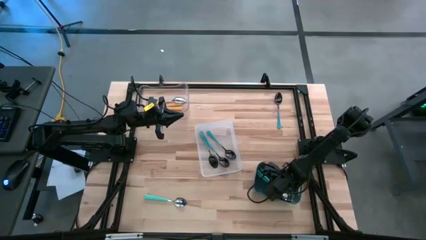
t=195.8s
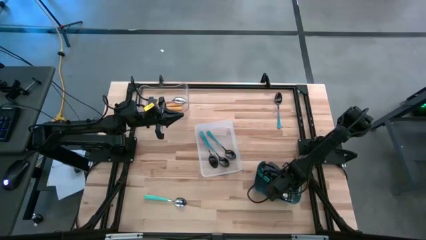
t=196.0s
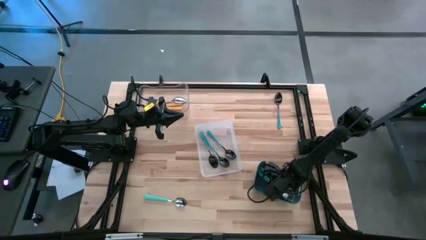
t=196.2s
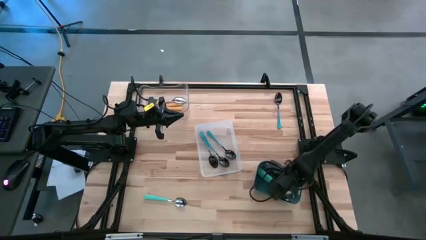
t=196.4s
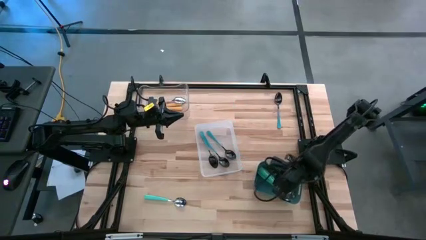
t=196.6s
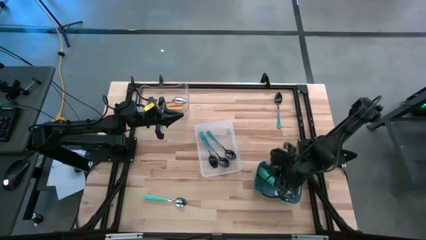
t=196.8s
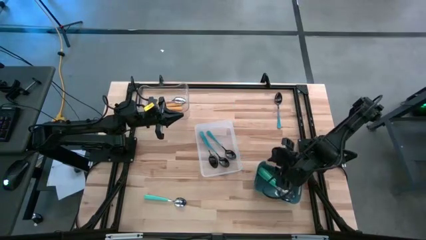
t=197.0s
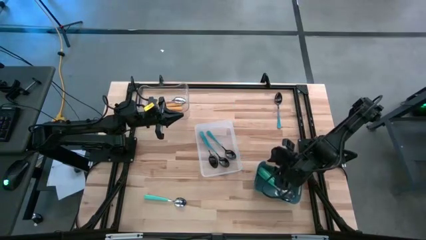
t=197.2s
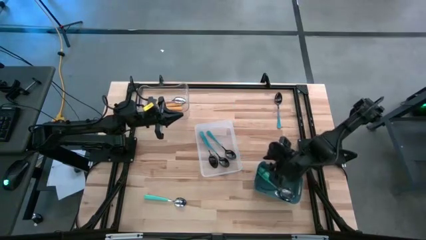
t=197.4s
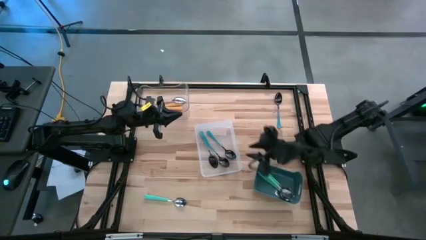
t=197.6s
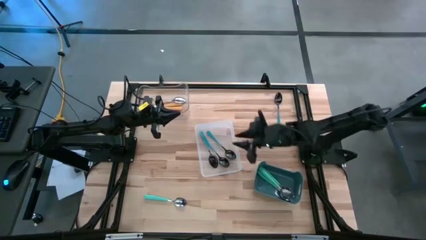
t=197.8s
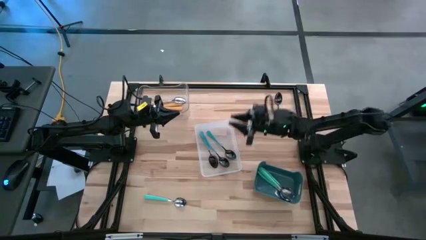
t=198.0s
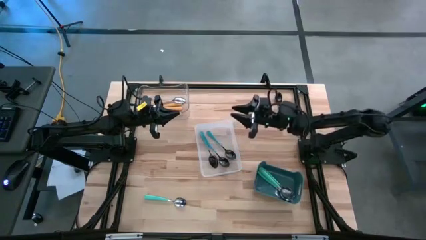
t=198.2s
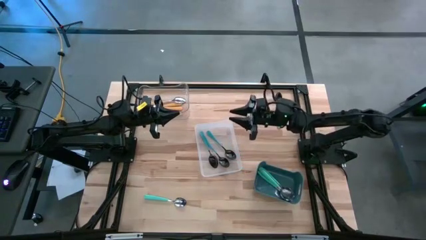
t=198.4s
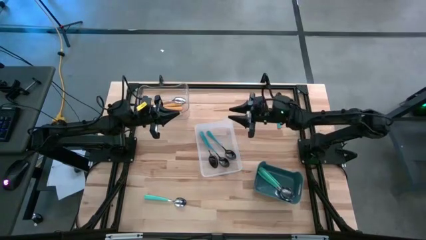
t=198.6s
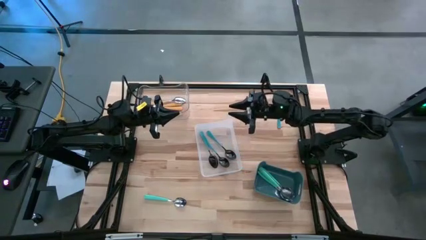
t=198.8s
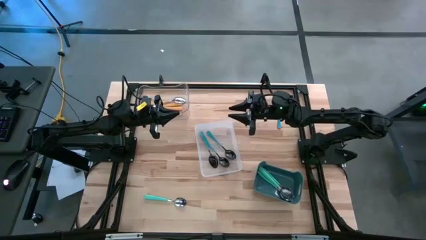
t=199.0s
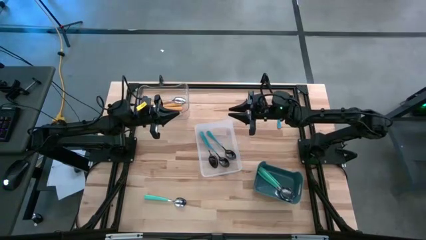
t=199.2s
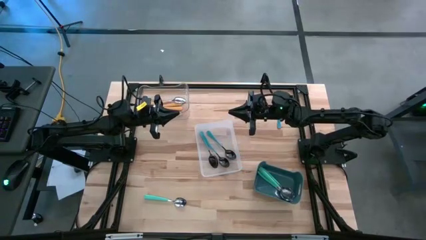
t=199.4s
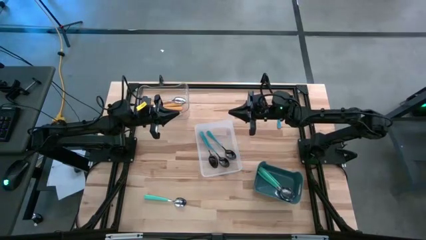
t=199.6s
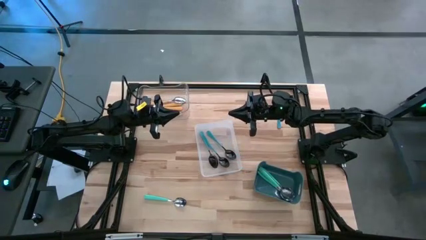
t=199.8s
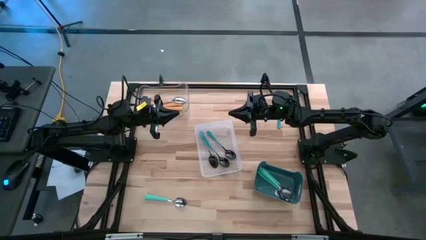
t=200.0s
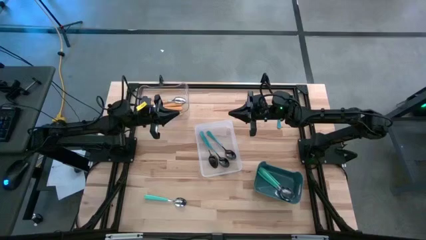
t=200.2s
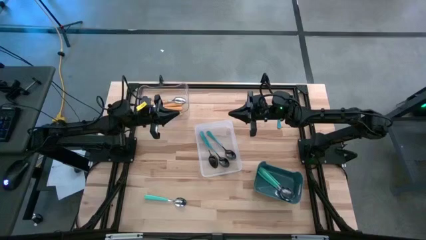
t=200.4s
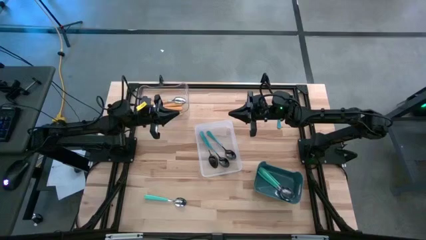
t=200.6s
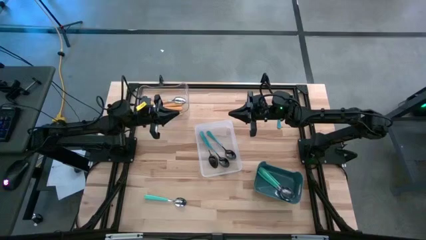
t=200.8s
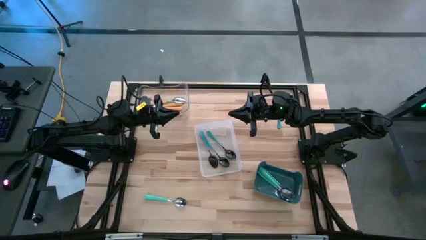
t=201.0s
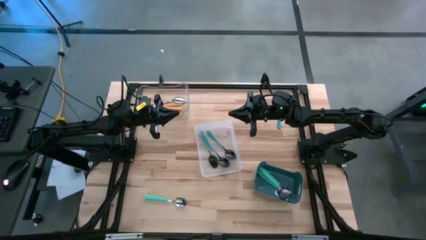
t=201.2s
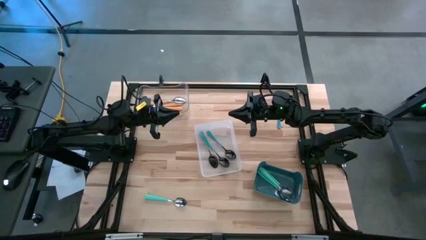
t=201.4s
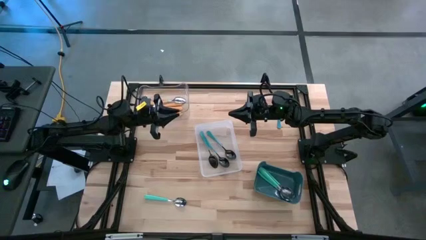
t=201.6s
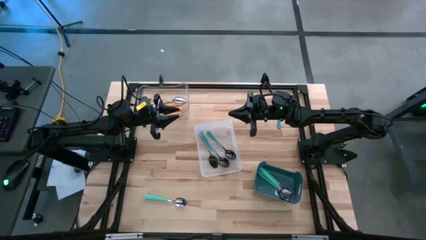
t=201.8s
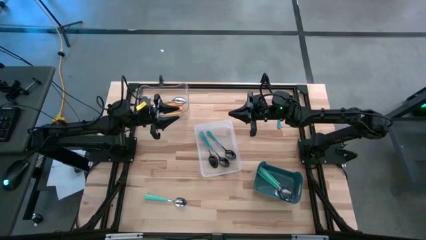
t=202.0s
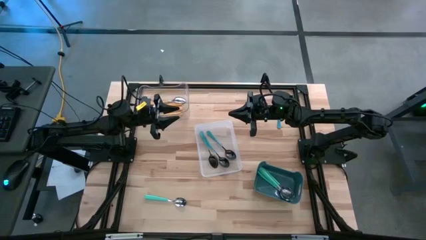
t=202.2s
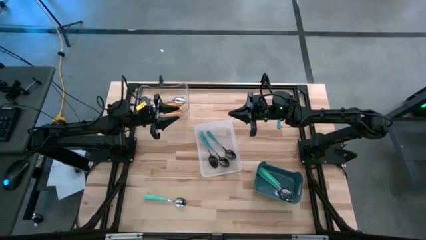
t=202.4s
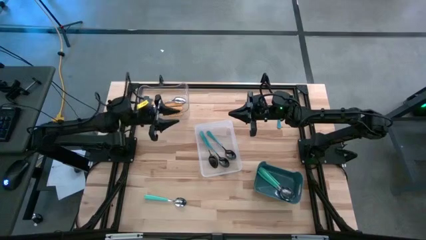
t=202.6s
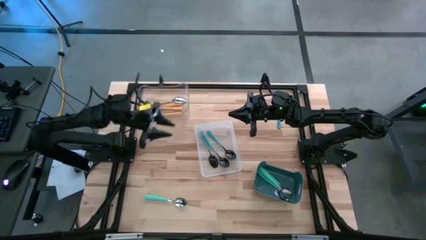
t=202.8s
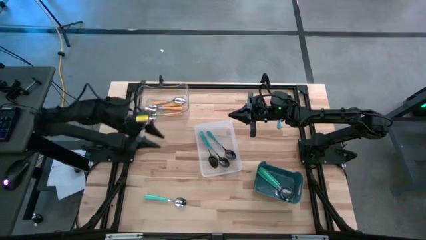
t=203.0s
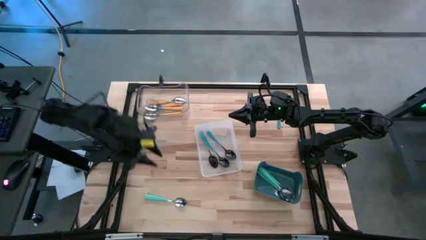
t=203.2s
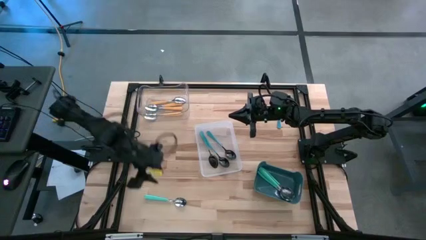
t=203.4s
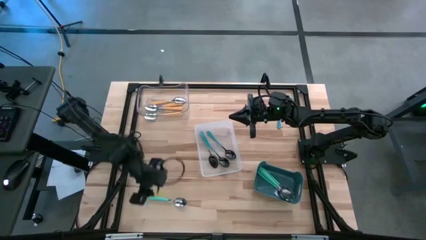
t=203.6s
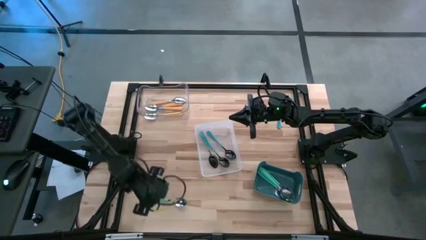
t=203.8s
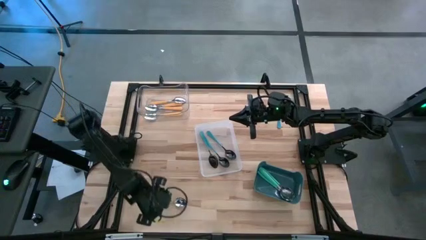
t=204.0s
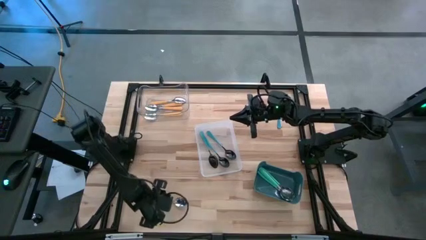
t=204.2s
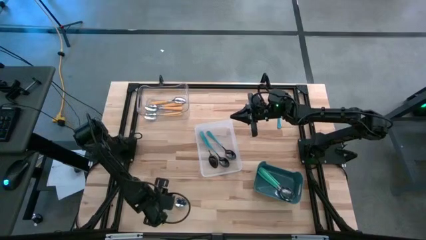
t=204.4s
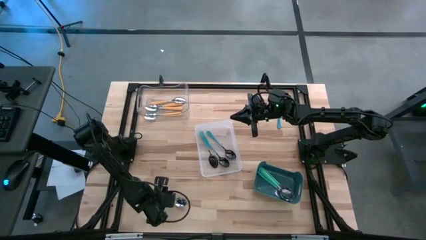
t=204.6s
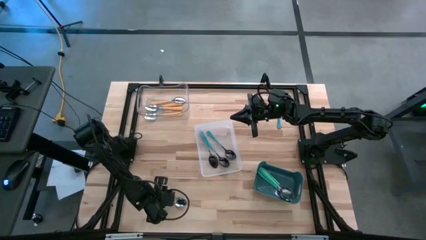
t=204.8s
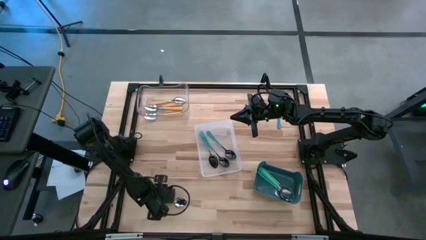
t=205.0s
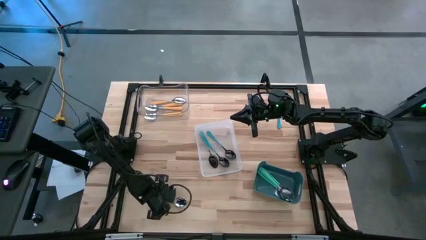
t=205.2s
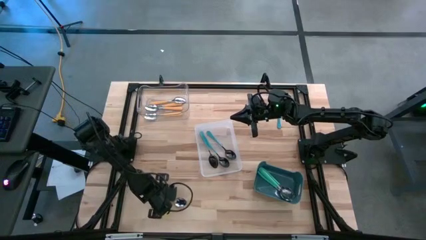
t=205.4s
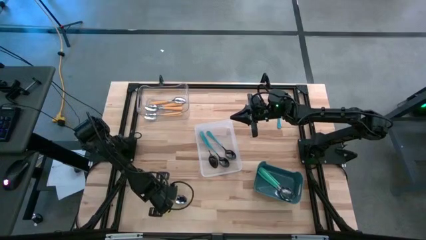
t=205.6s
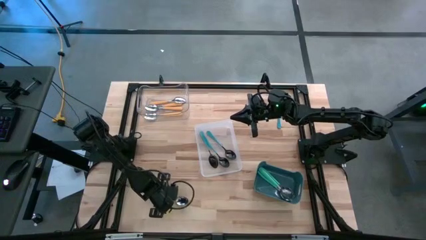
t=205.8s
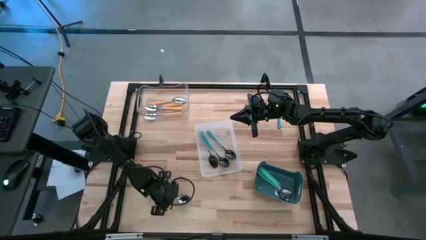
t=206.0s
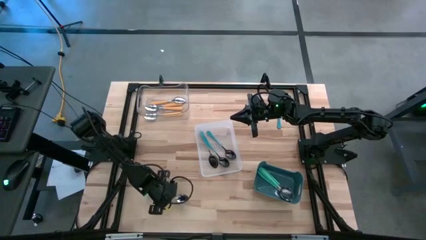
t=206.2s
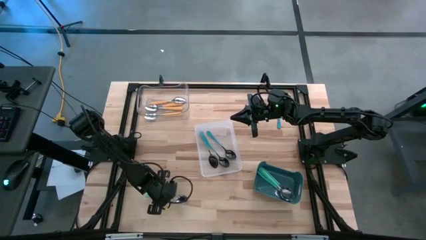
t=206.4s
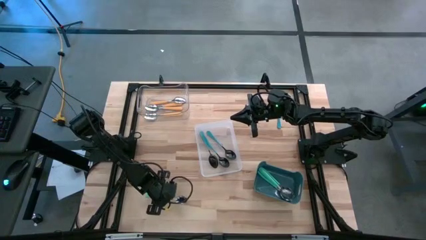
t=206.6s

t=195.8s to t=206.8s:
Task: Sort silverware by color (type)
Put the light blue spoon into the blue bin
